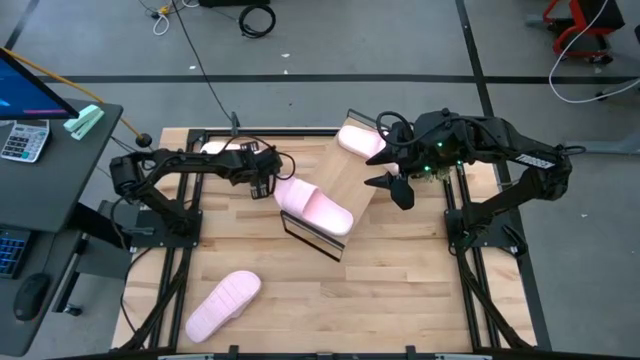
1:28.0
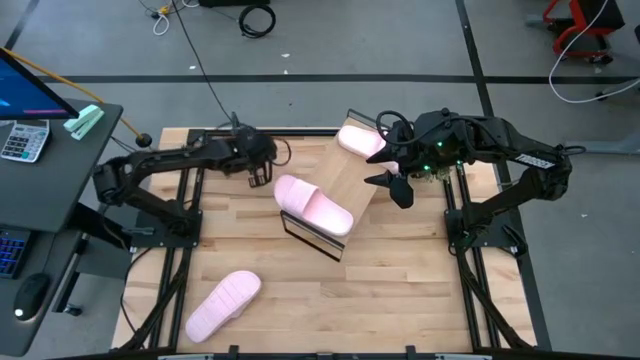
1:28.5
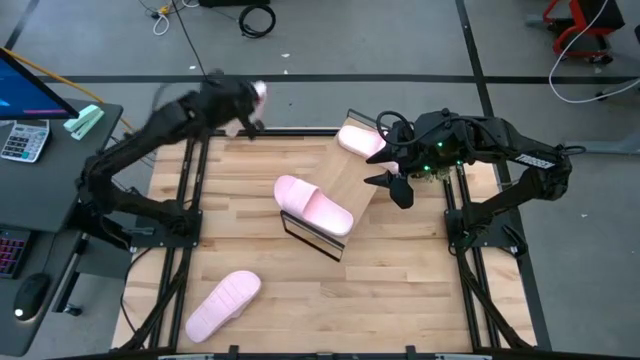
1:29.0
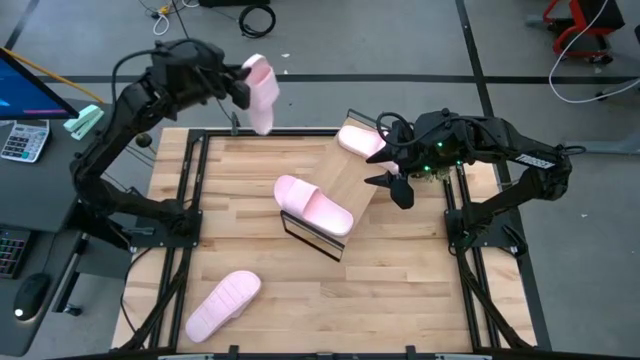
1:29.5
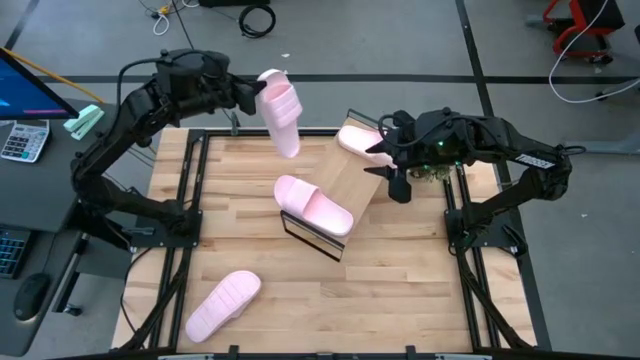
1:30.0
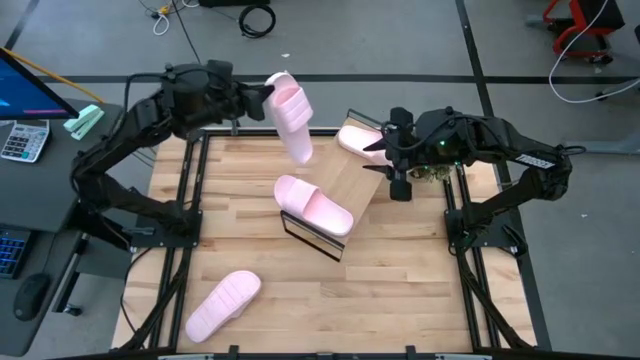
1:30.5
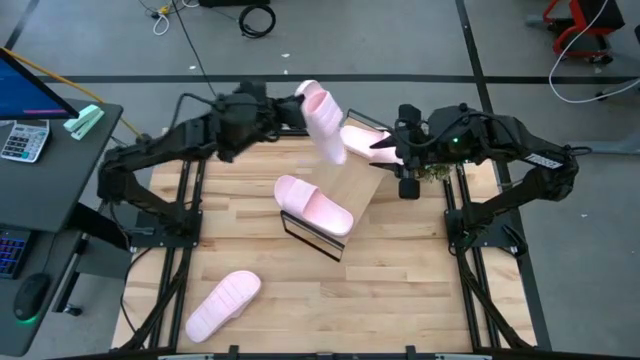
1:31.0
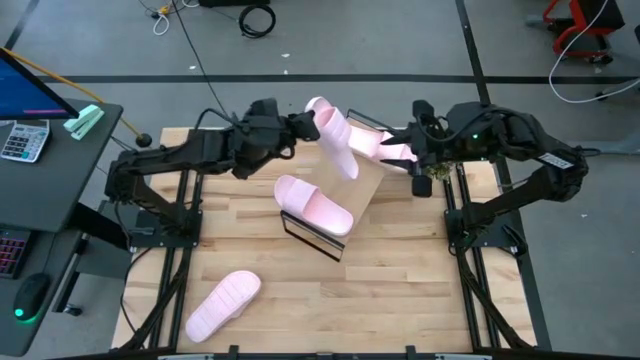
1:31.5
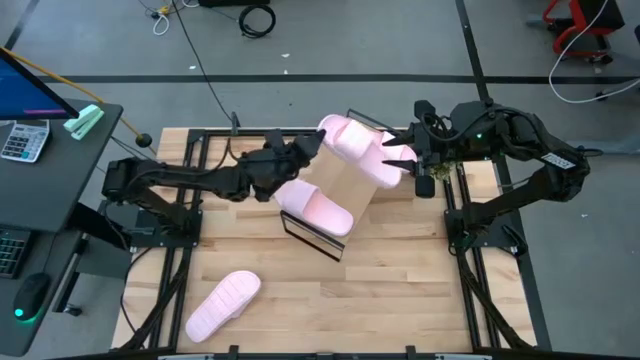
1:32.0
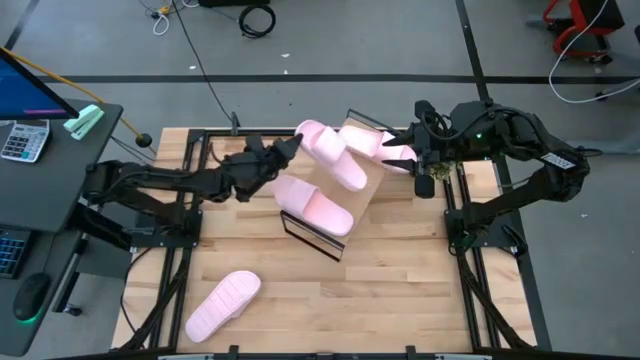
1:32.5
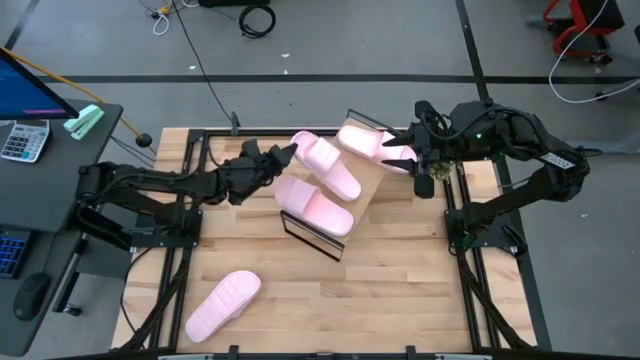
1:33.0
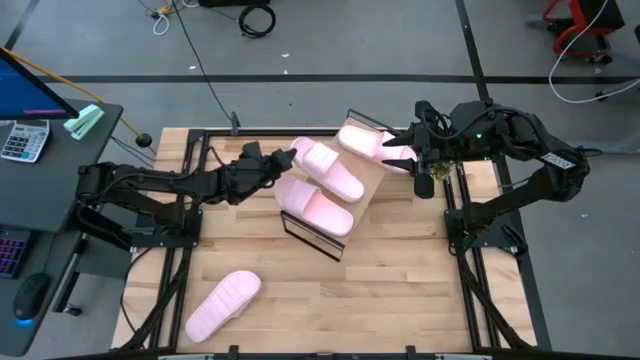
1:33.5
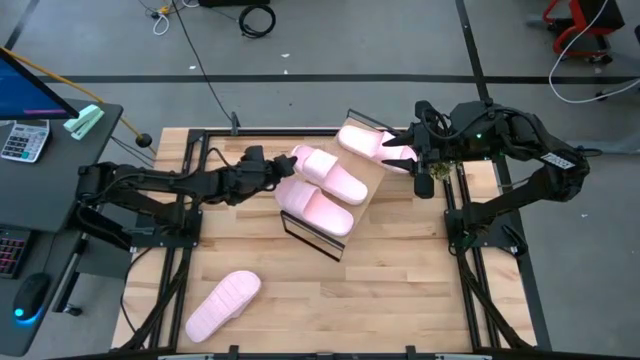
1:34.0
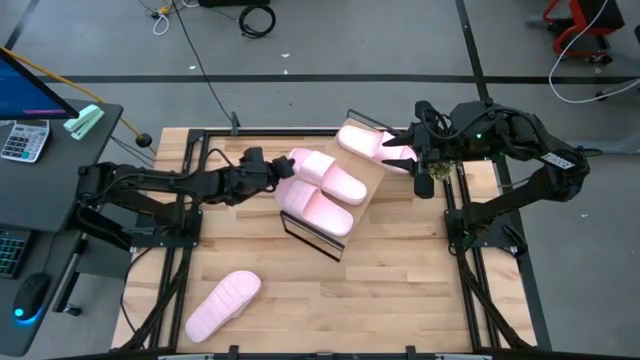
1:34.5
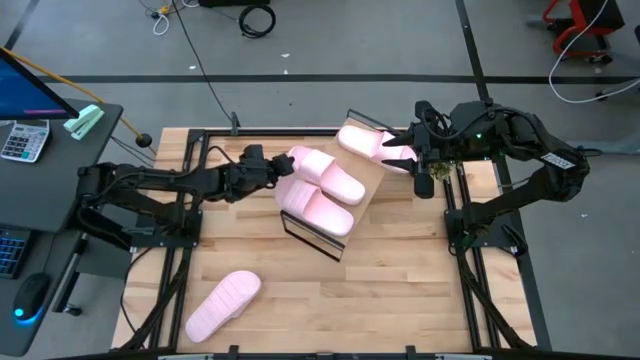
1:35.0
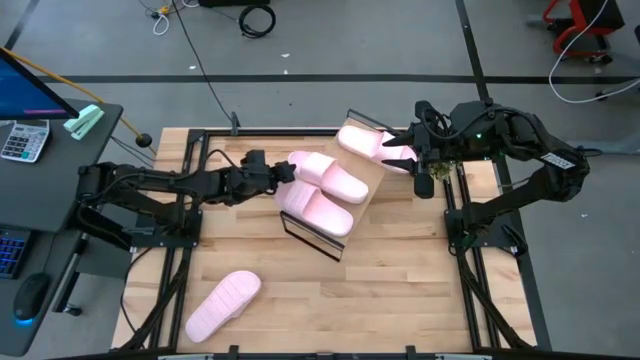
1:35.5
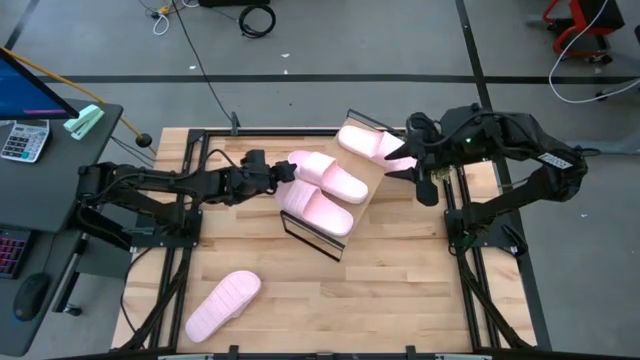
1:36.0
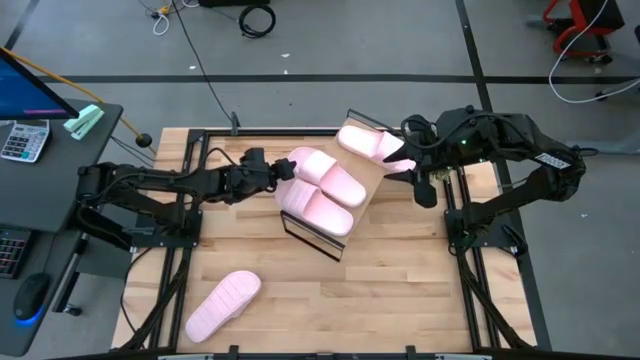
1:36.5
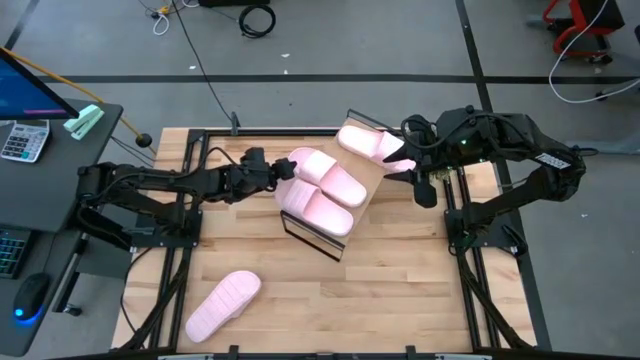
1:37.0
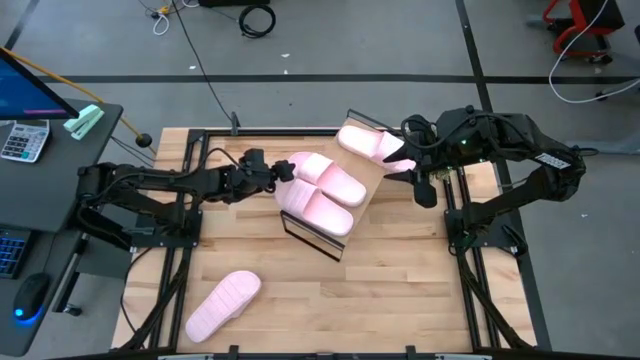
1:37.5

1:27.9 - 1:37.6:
Task: Pick and place slides into the shelf
Put the top pink slide on the shelf

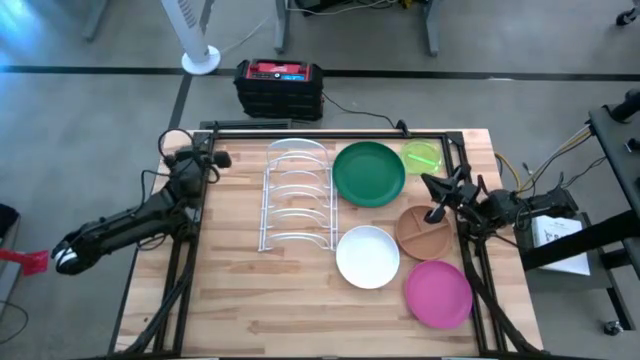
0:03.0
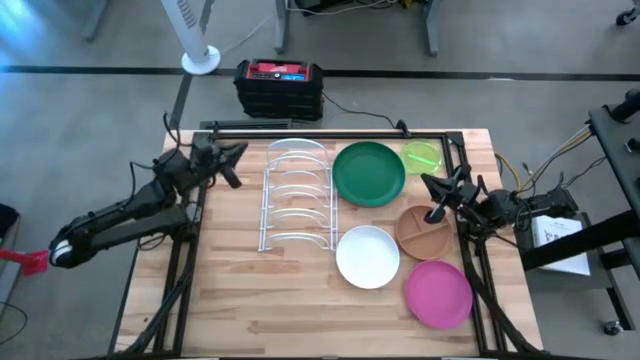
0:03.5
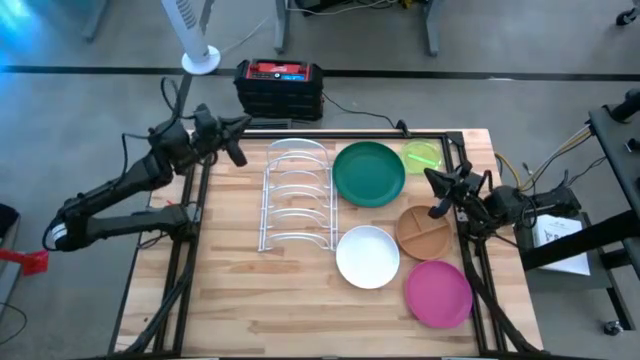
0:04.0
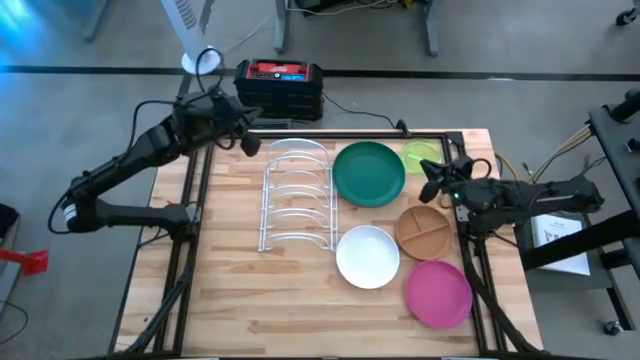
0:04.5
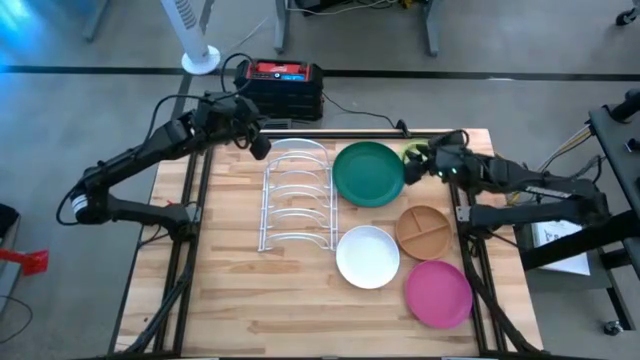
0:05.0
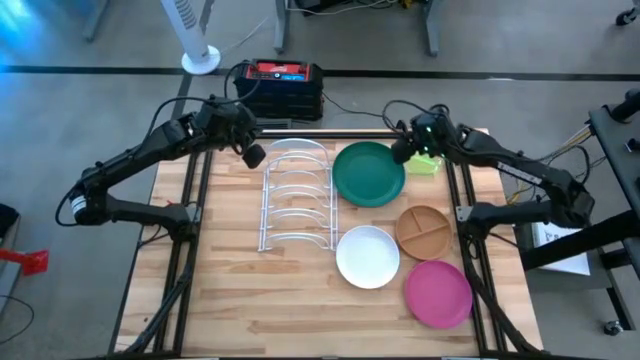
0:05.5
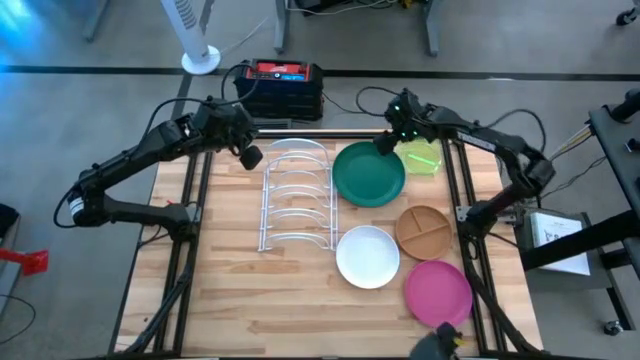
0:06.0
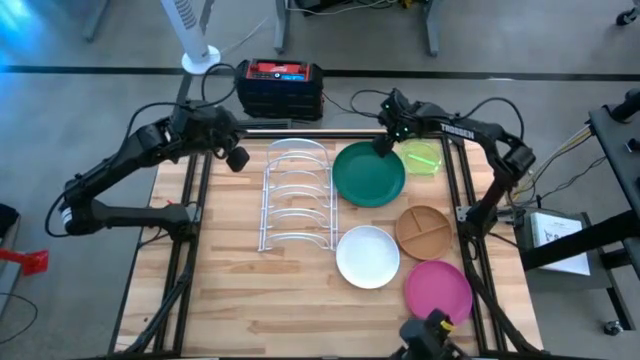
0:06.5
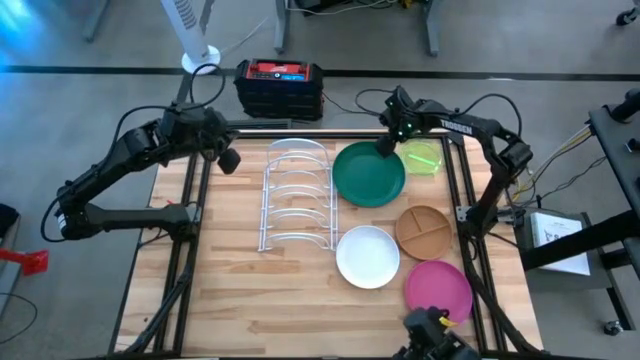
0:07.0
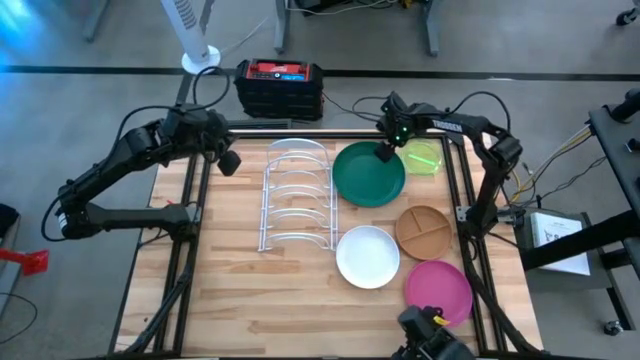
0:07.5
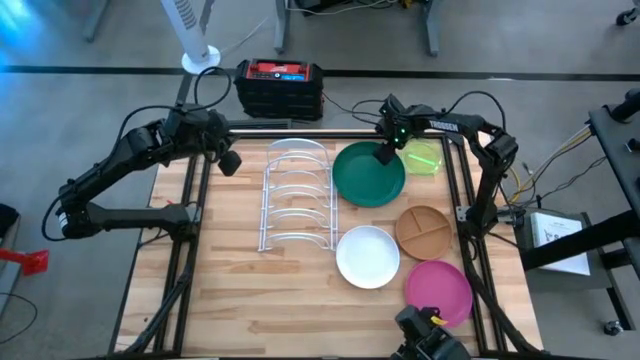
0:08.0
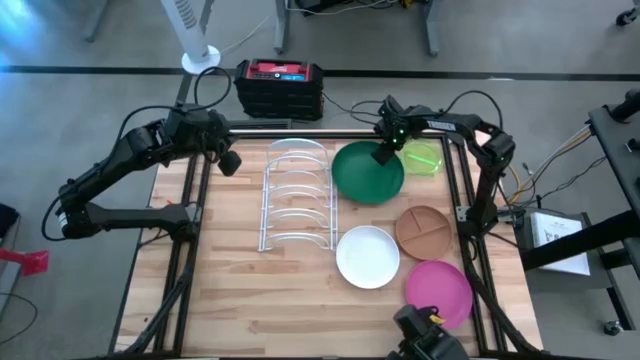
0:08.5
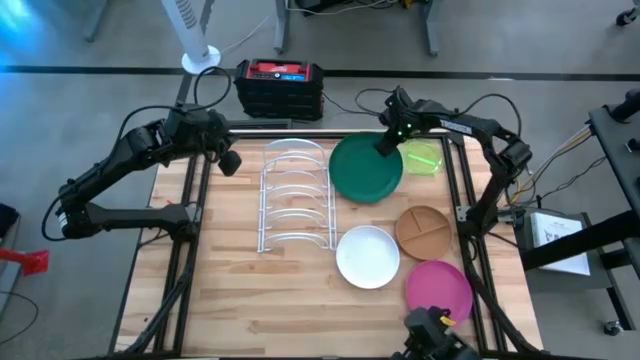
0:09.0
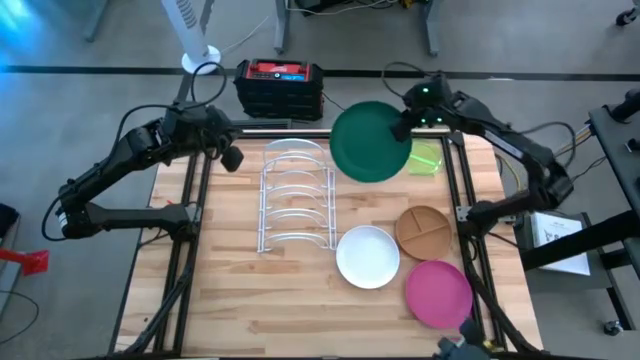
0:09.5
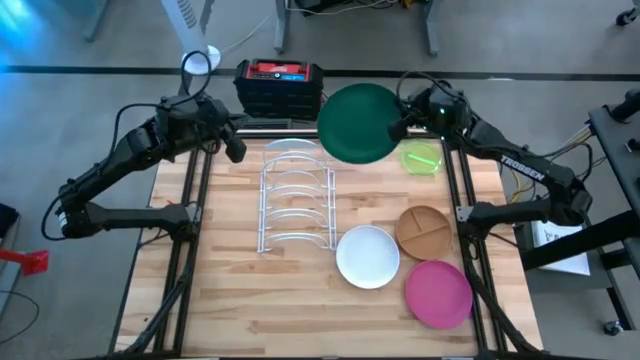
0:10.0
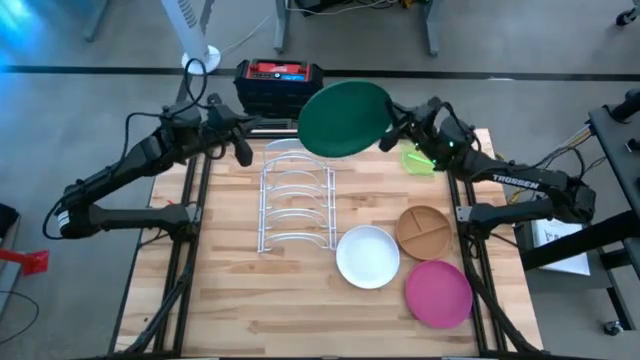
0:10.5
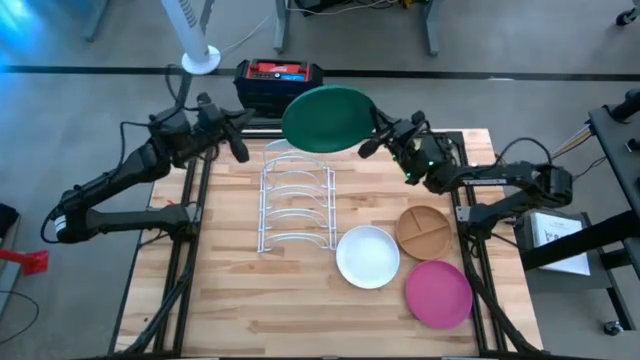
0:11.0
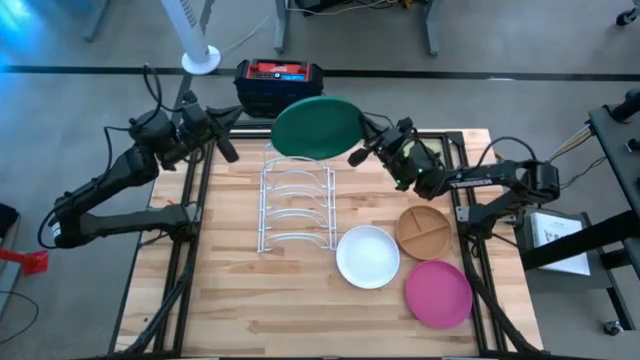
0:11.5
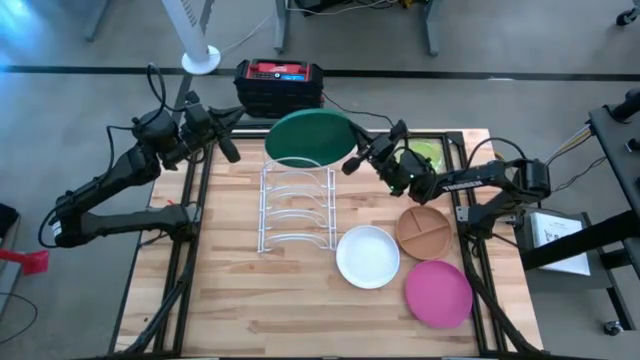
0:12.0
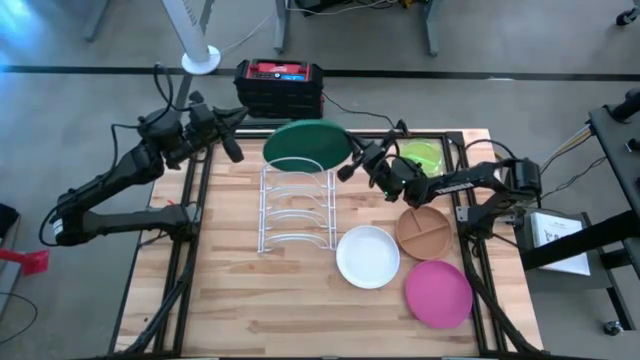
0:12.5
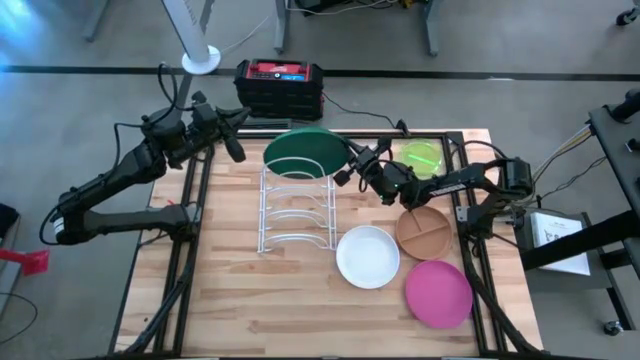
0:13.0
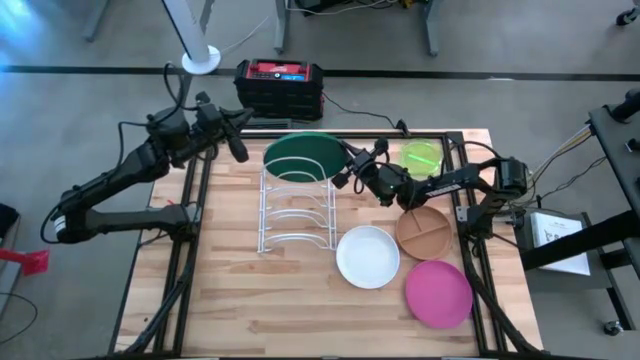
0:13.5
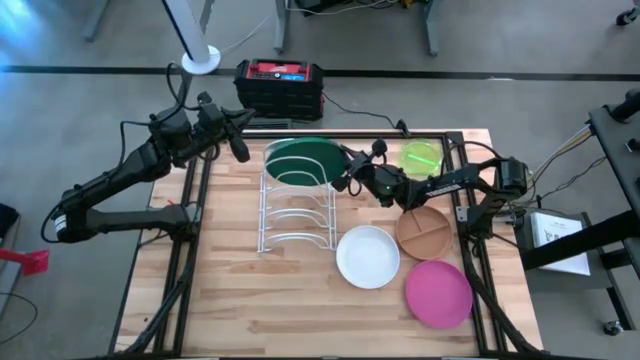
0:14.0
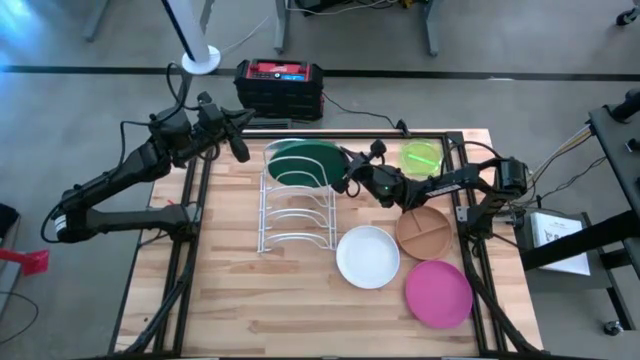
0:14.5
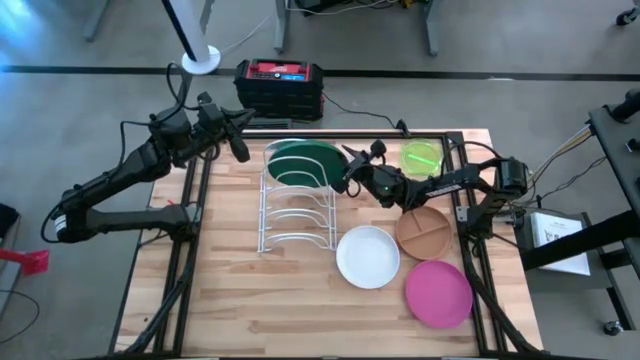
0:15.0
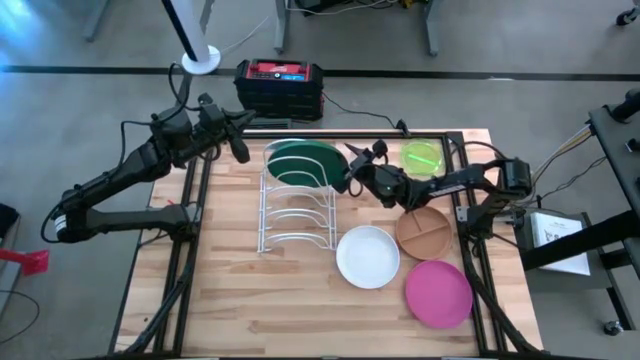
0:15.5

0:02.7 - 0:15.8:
Task: Sort dishes
Put the green plate in the dish rack
